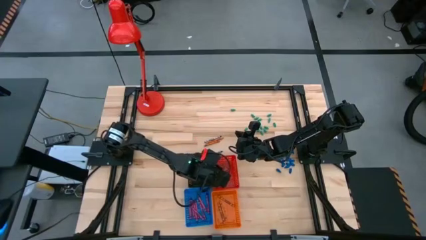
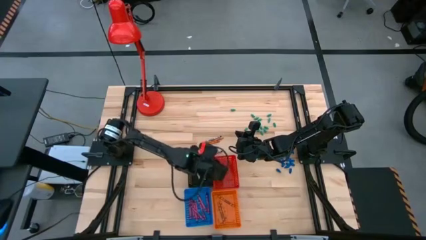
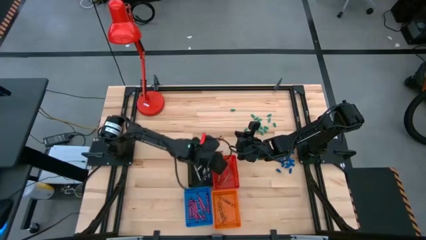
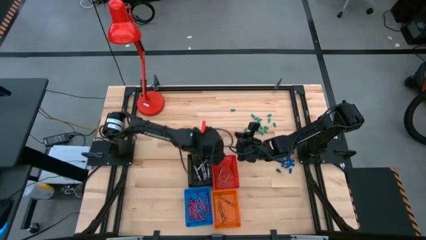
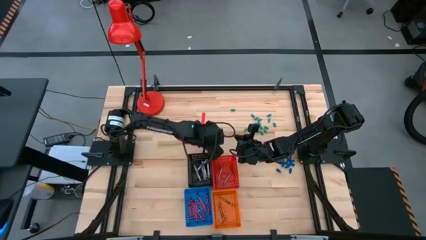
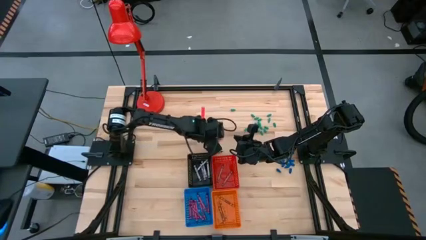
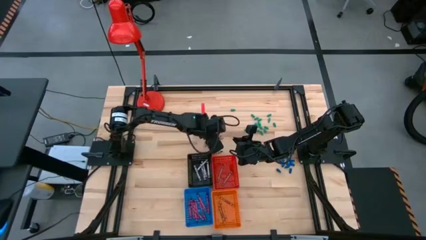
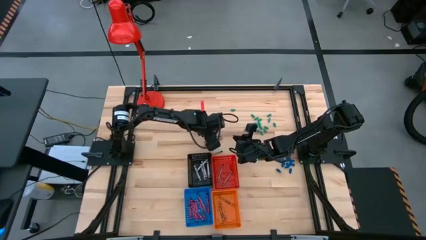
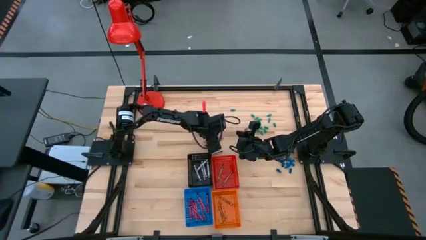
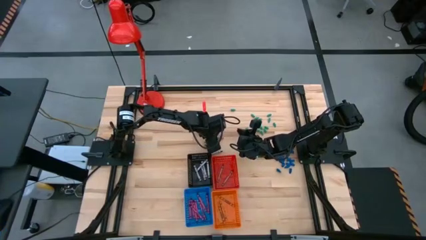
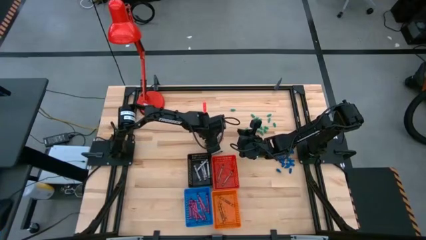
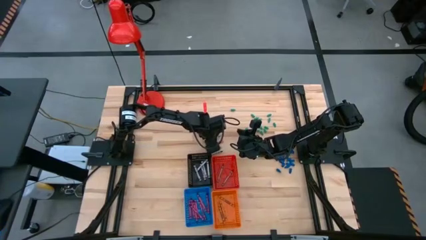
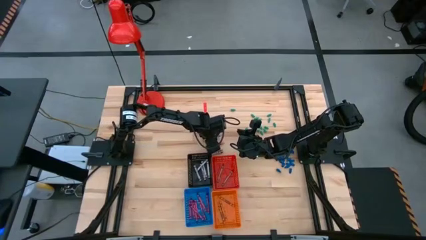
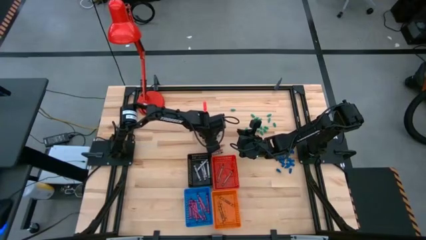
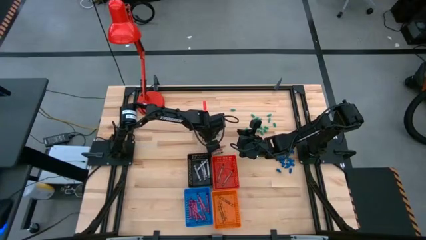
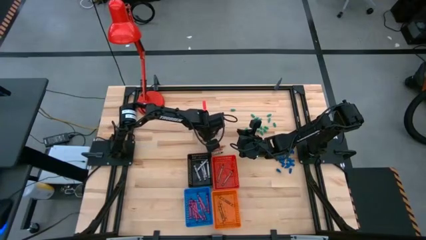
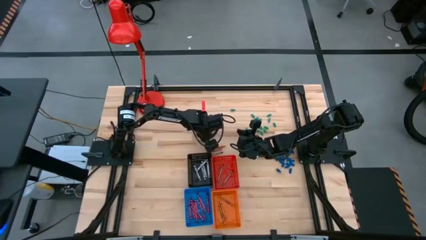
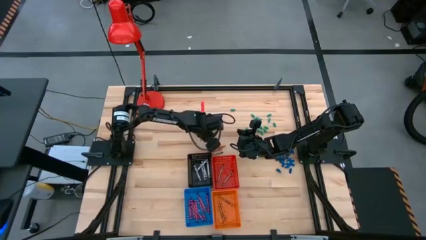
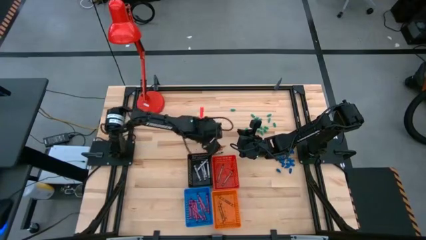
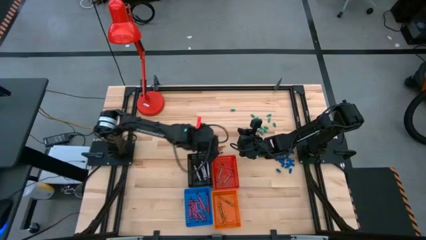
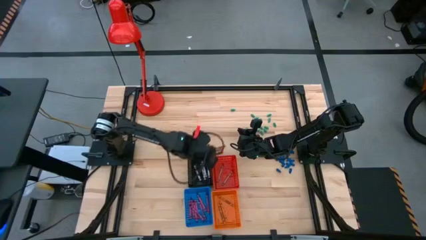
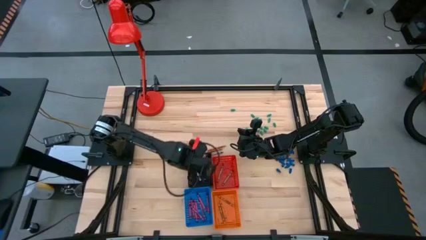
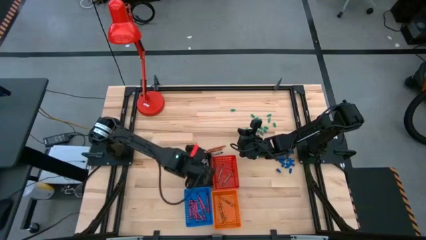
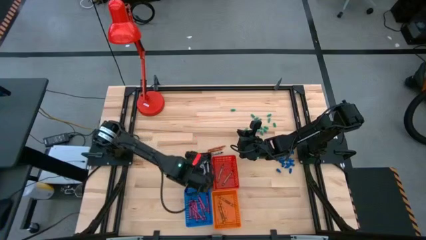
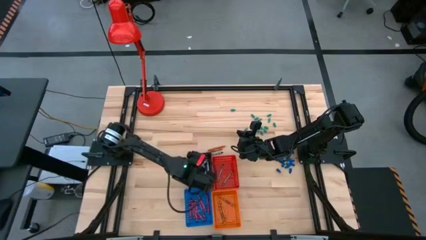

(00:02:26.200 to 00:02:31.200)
Task: Sort crayons
Put the black crayon into the black basket

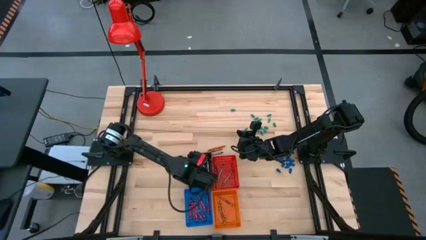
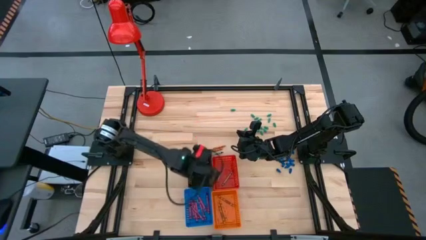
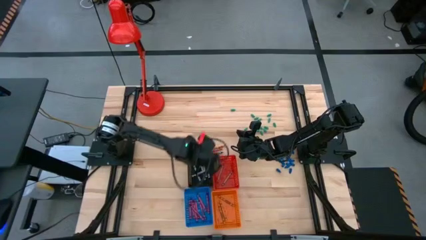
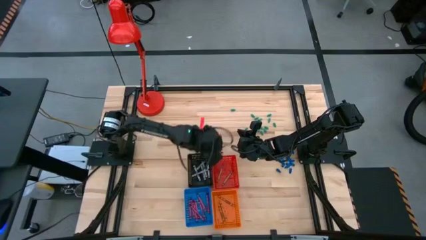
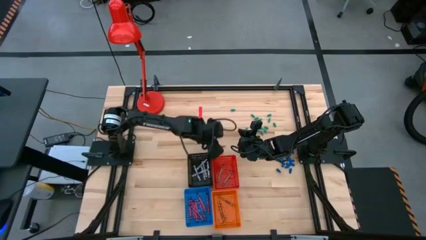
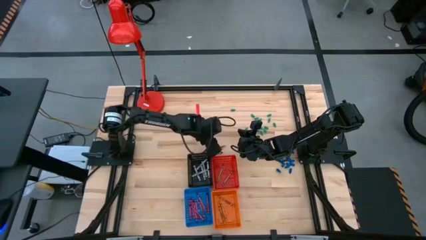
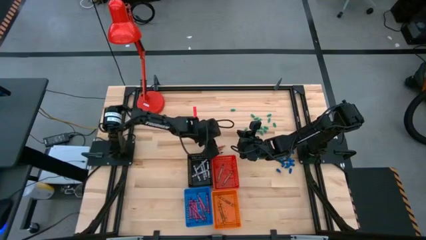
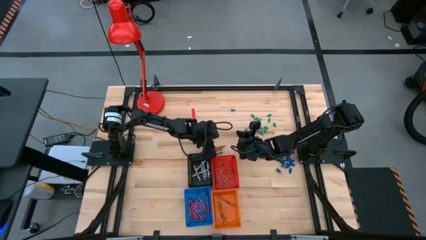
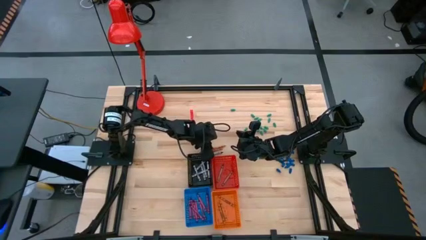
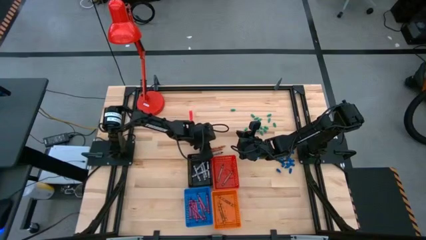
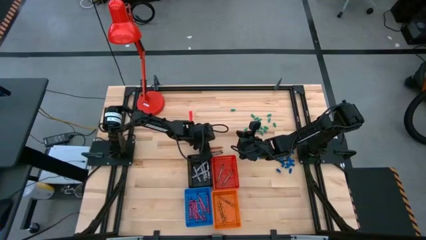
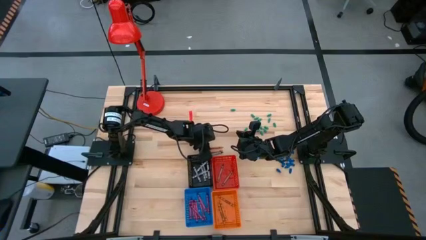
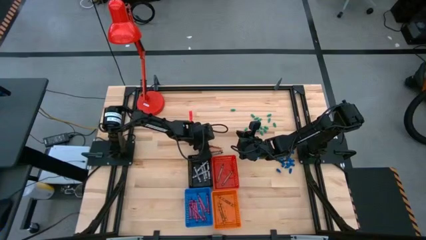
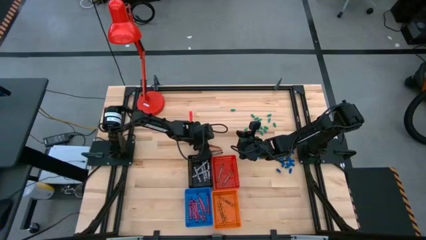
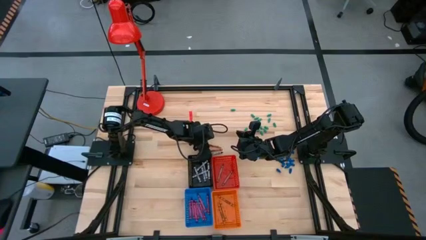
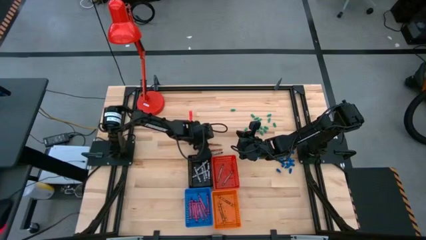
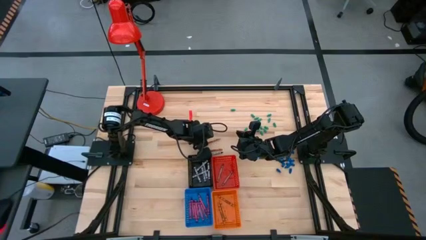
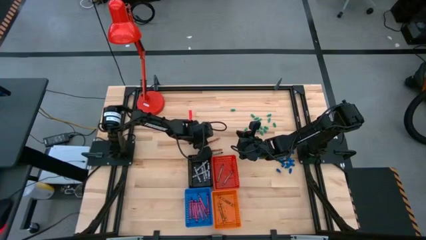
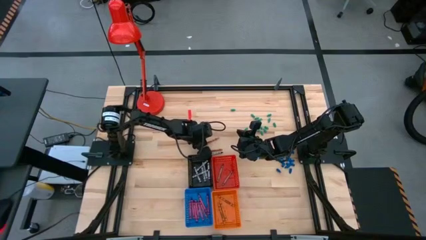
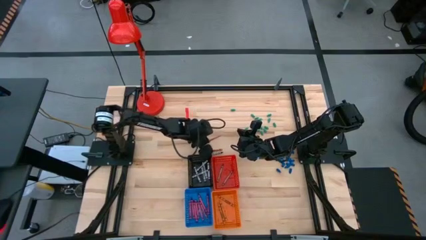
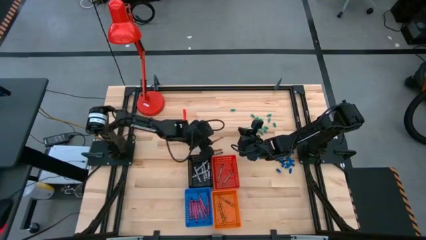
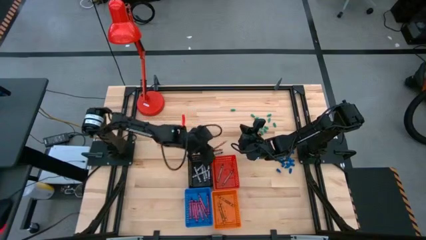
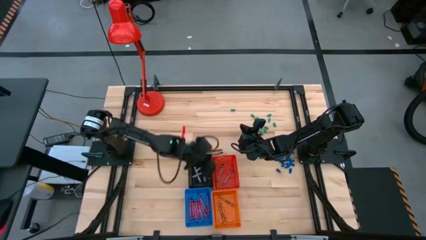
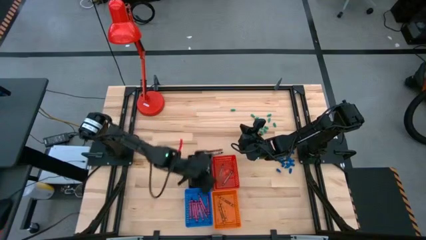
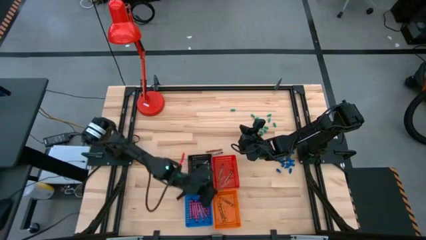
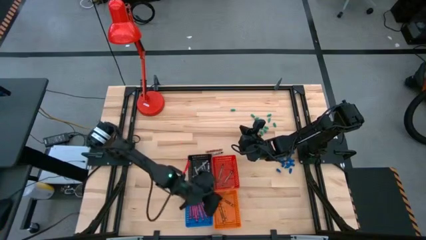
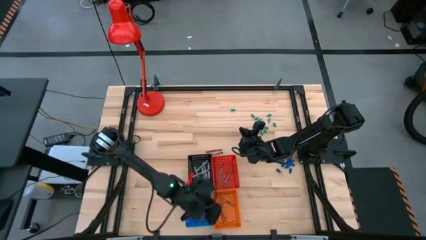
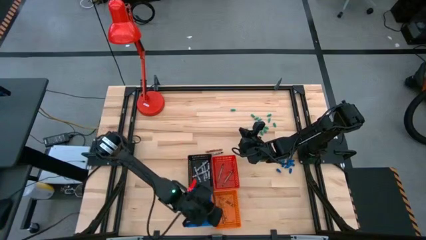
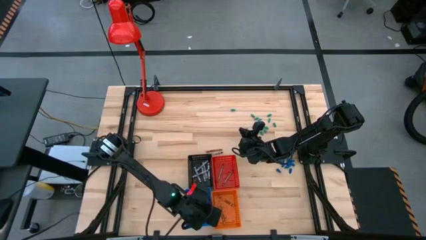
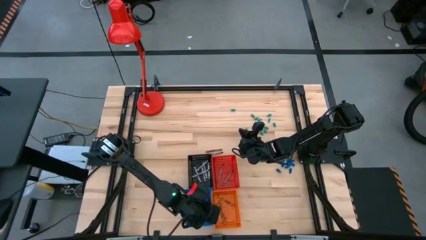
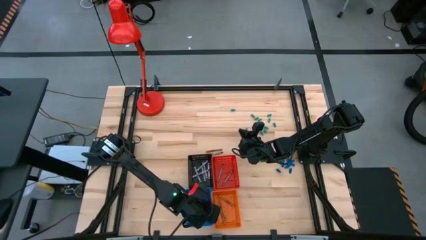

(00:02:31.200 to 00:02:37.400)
Put the orange crayon into the orange basket

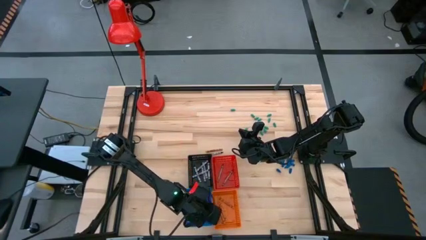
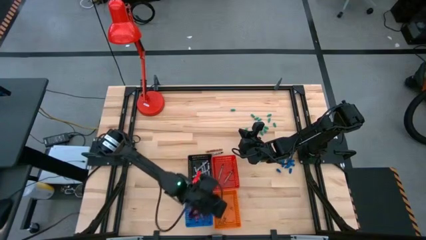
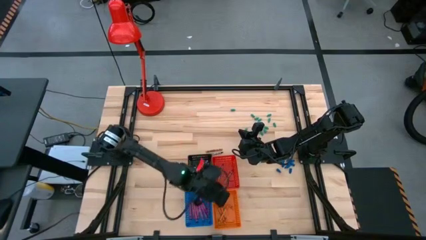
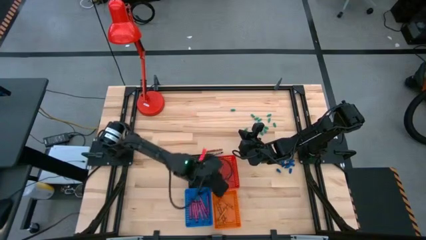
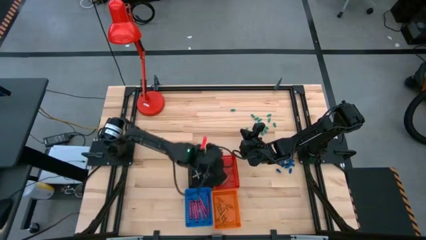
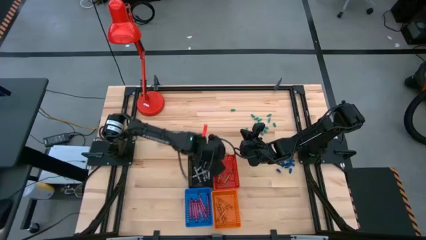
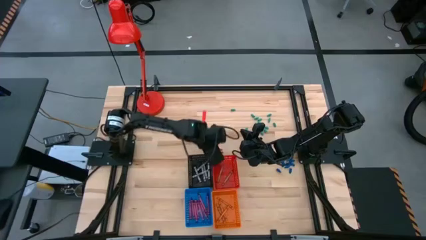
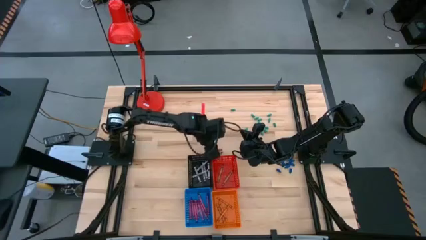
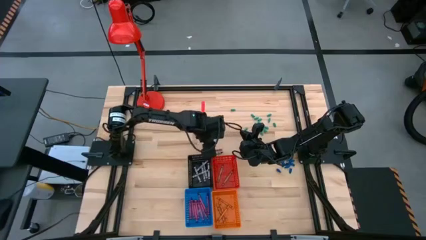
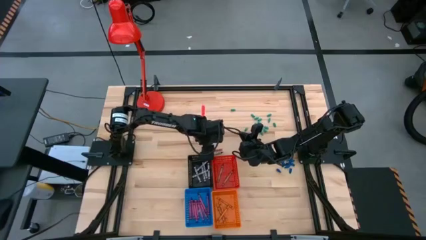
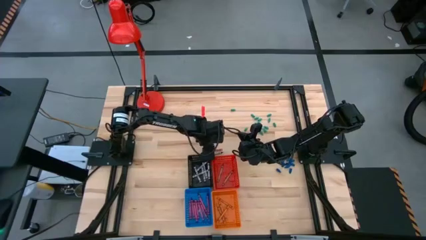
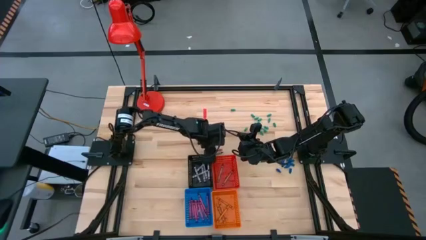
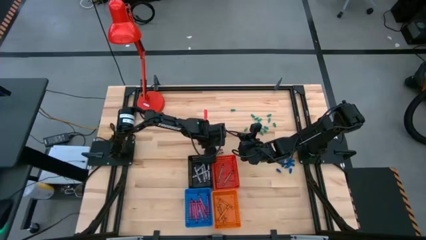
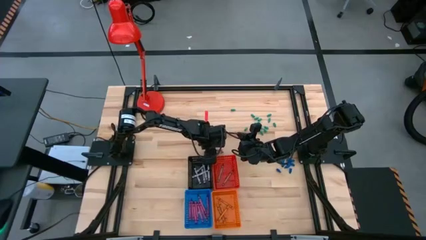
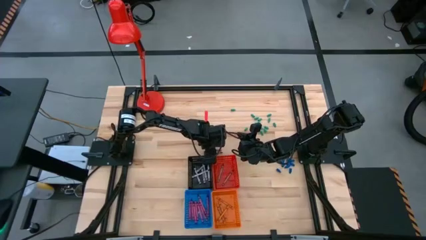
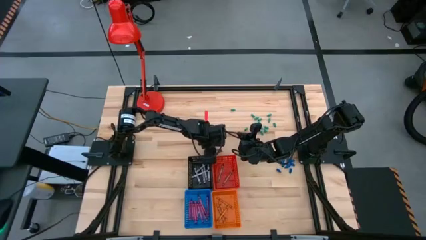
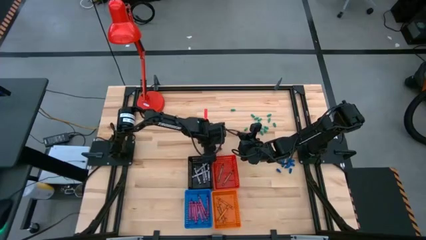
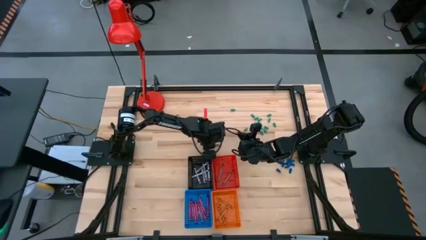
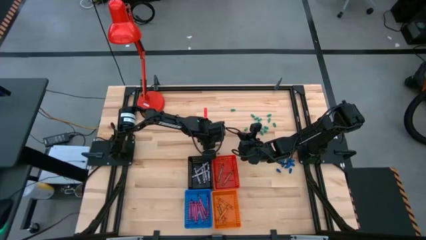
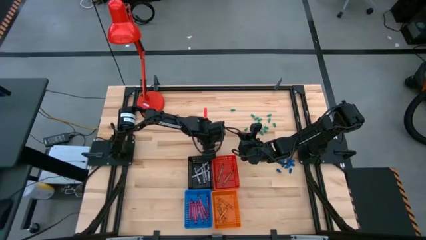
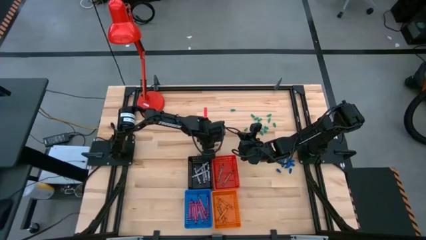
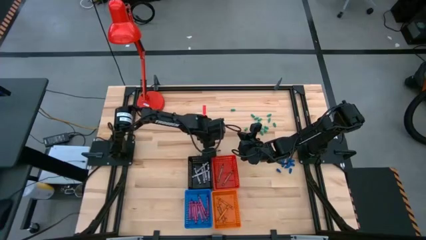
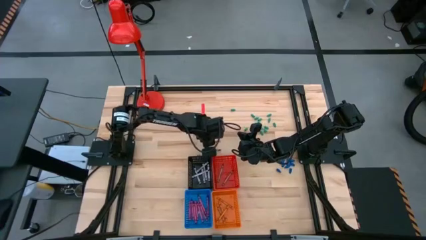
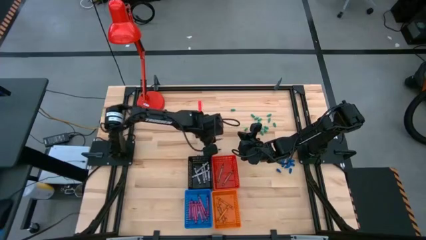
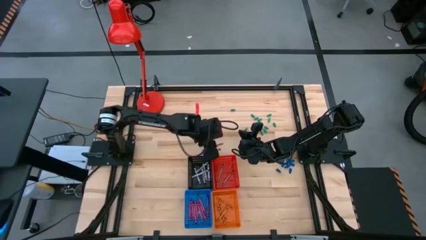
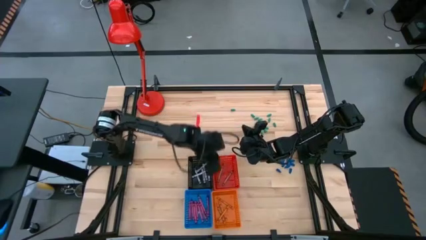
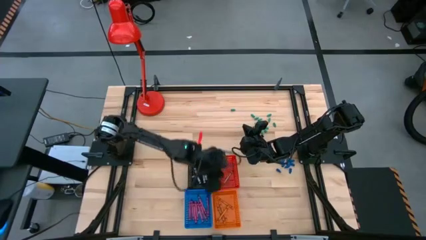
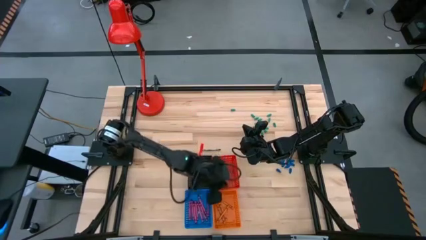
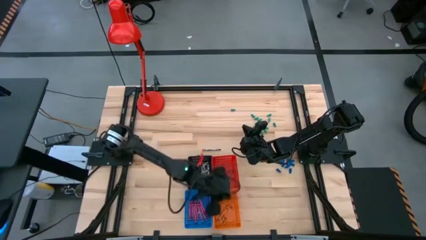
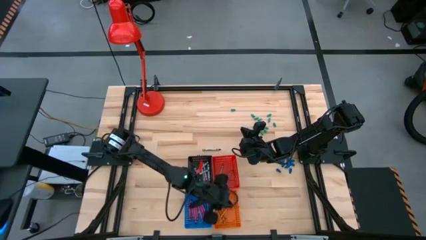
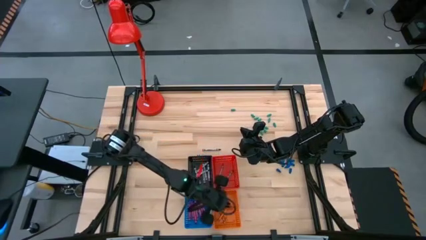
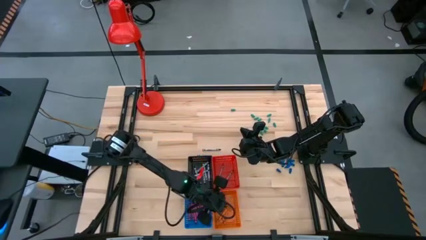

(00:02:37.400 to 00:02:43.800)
Put the orange crayon into the orange basket
